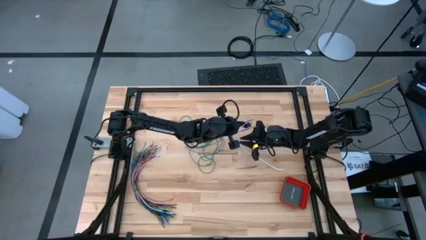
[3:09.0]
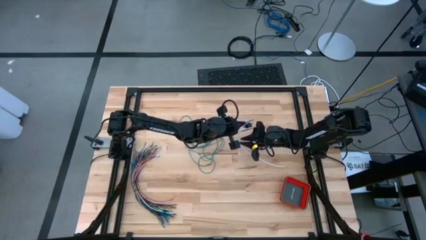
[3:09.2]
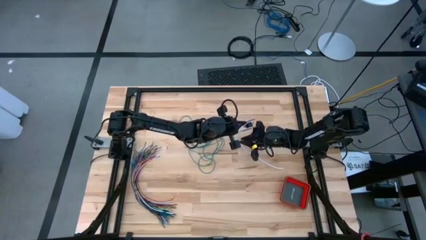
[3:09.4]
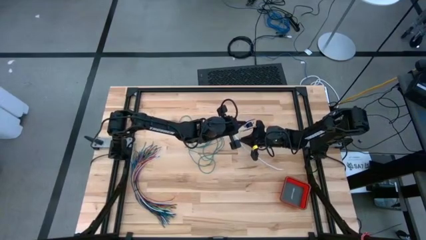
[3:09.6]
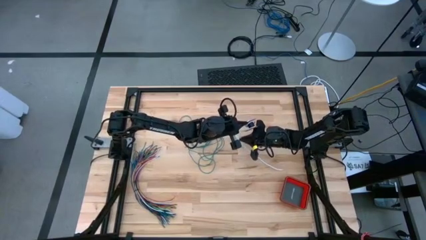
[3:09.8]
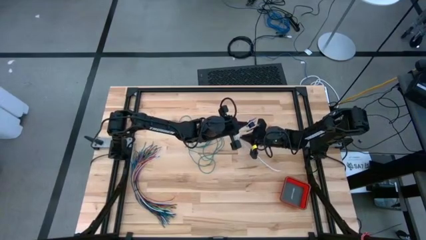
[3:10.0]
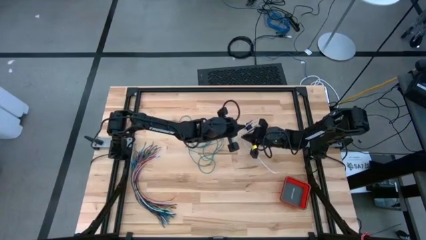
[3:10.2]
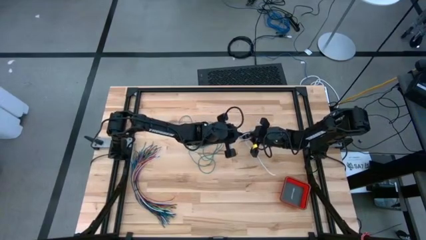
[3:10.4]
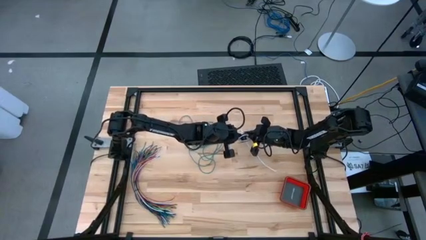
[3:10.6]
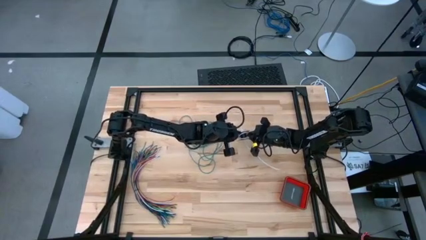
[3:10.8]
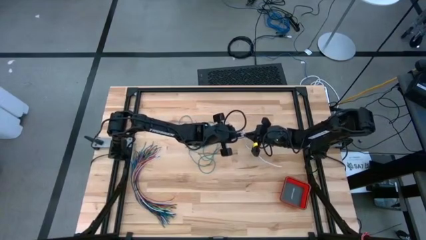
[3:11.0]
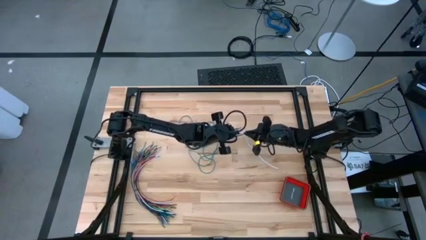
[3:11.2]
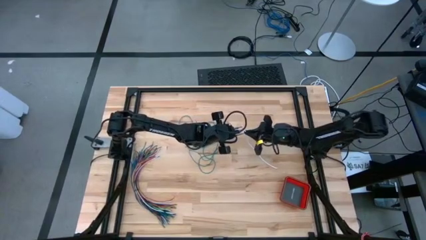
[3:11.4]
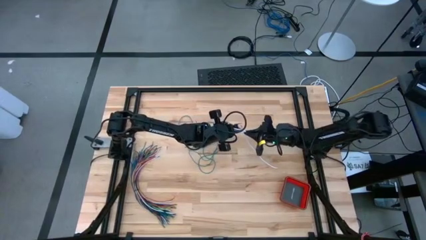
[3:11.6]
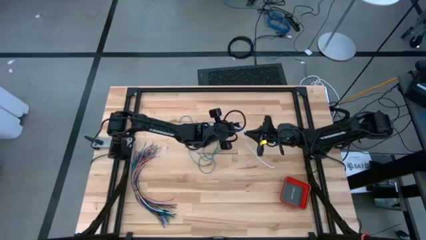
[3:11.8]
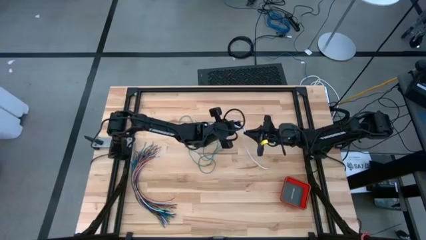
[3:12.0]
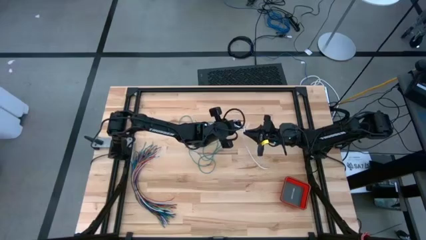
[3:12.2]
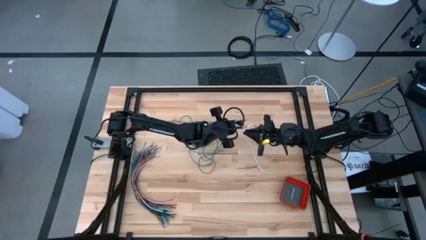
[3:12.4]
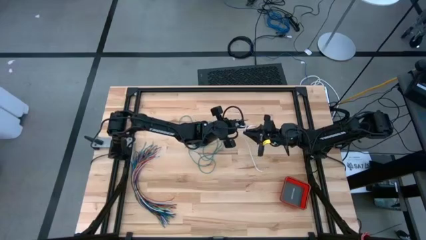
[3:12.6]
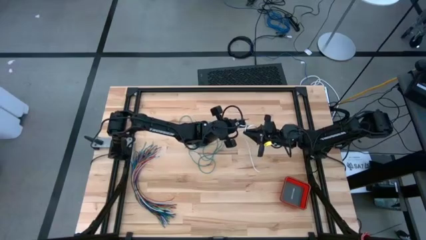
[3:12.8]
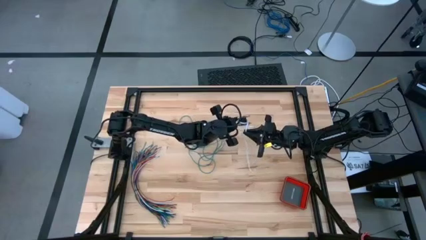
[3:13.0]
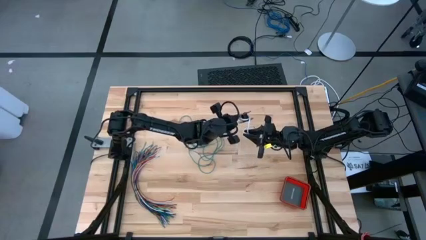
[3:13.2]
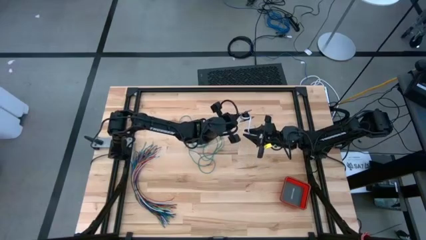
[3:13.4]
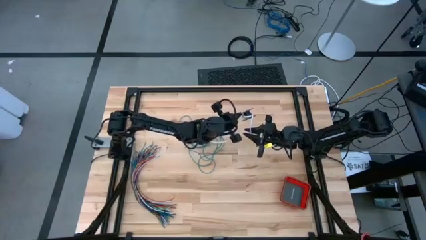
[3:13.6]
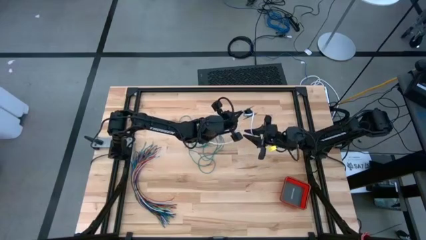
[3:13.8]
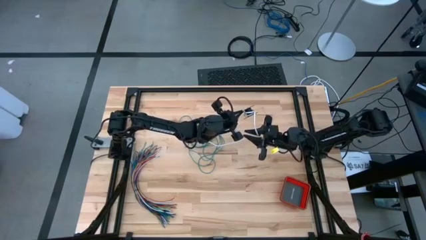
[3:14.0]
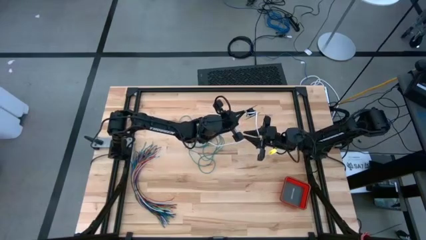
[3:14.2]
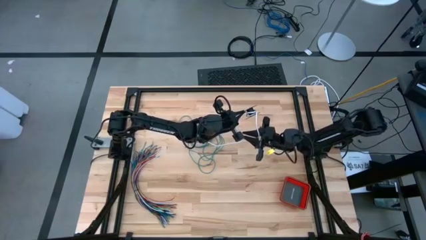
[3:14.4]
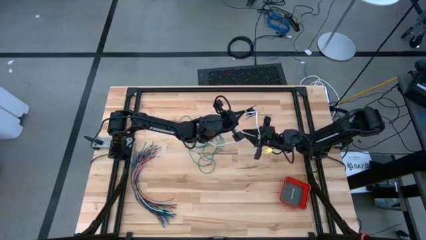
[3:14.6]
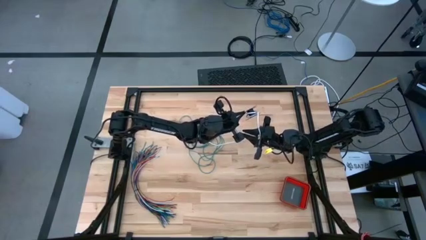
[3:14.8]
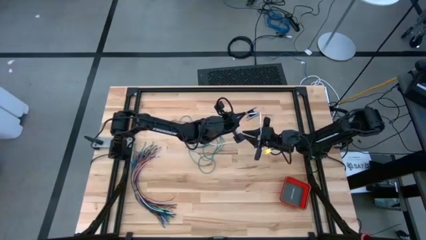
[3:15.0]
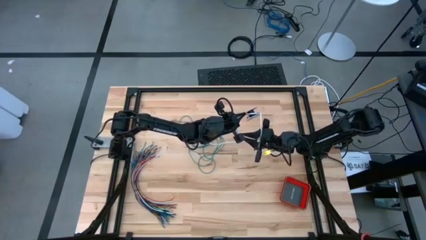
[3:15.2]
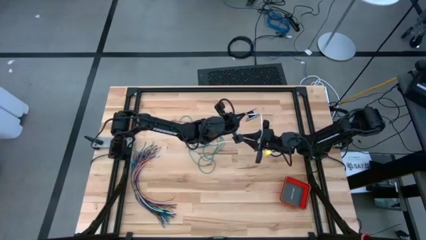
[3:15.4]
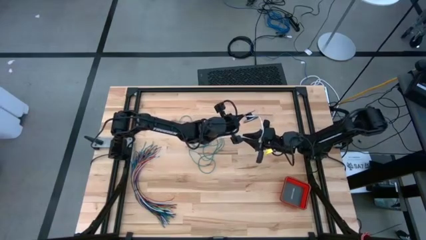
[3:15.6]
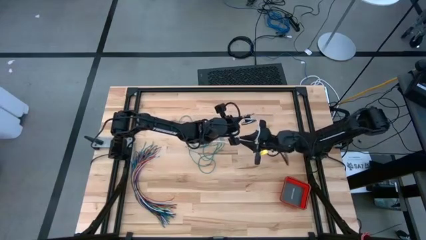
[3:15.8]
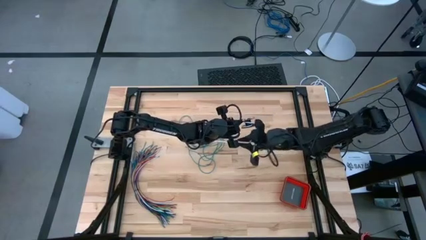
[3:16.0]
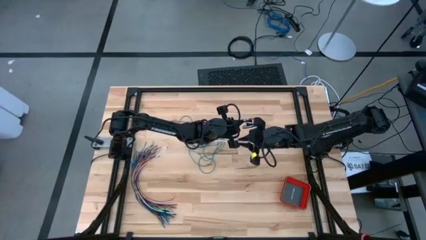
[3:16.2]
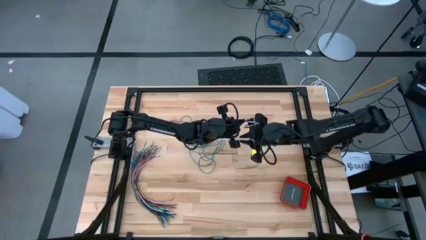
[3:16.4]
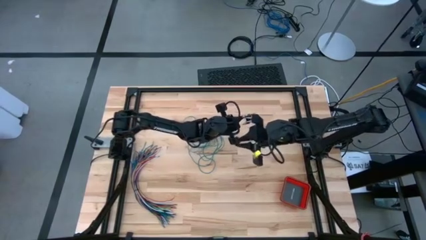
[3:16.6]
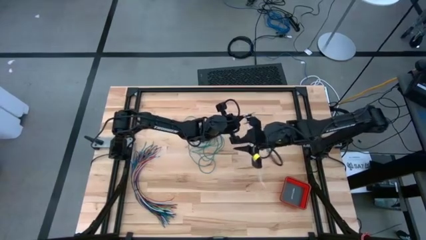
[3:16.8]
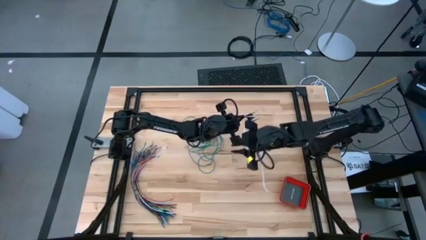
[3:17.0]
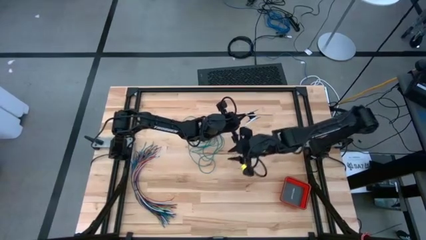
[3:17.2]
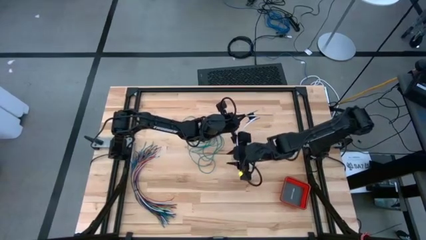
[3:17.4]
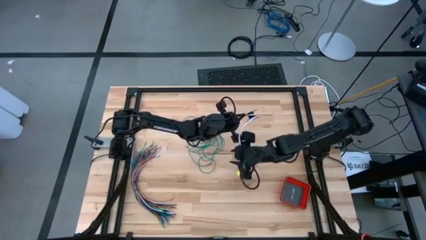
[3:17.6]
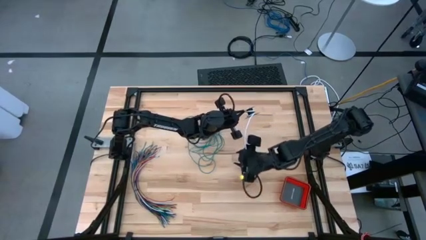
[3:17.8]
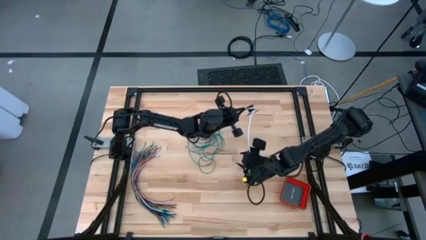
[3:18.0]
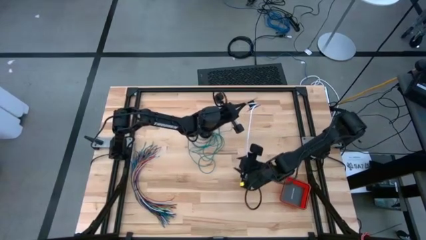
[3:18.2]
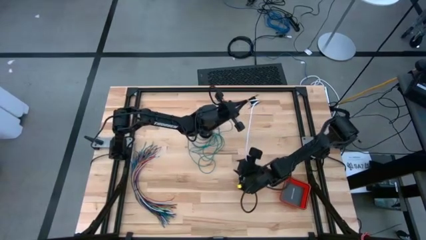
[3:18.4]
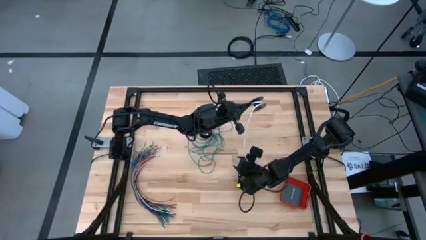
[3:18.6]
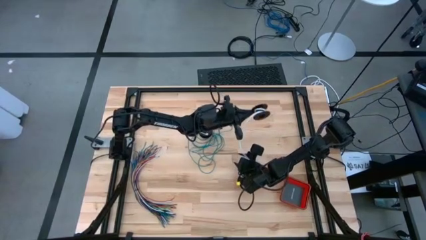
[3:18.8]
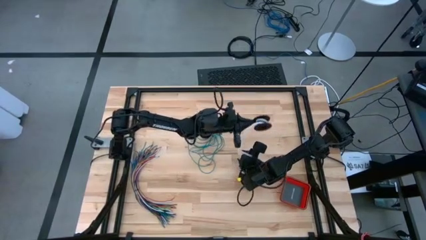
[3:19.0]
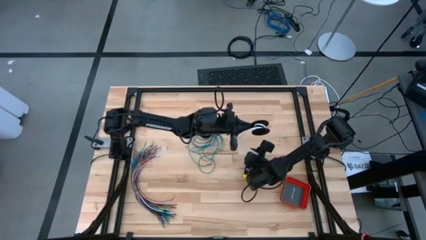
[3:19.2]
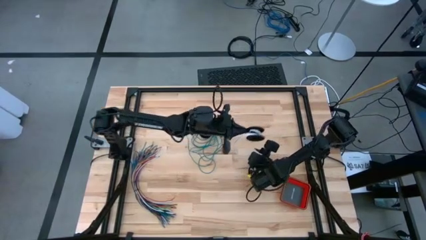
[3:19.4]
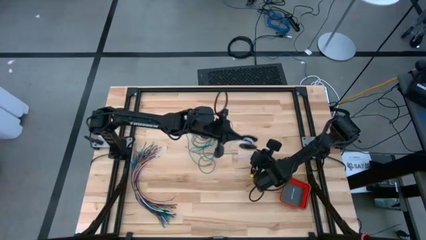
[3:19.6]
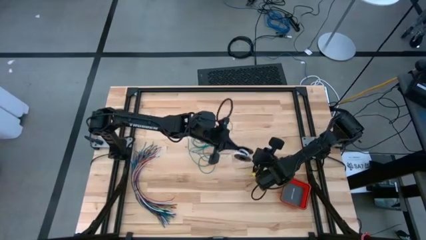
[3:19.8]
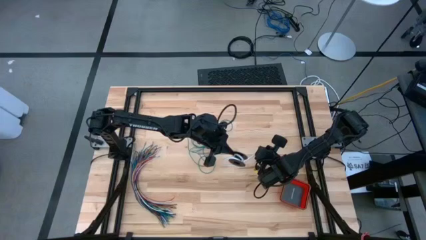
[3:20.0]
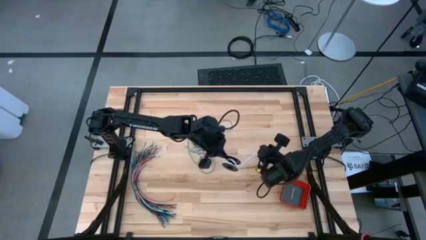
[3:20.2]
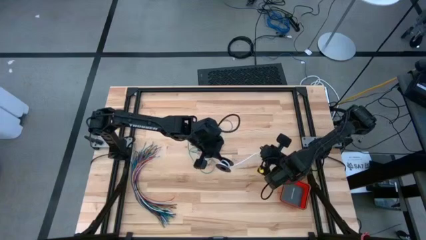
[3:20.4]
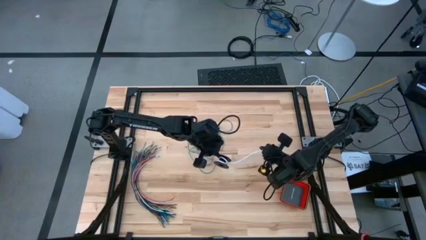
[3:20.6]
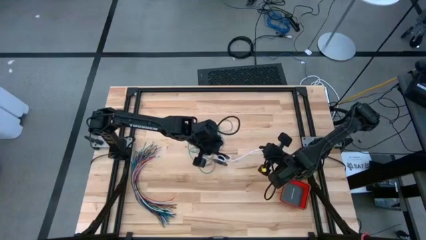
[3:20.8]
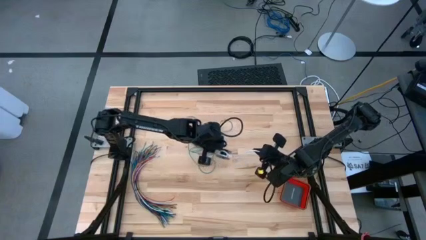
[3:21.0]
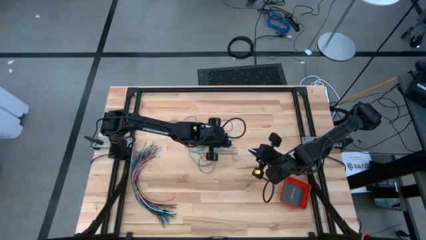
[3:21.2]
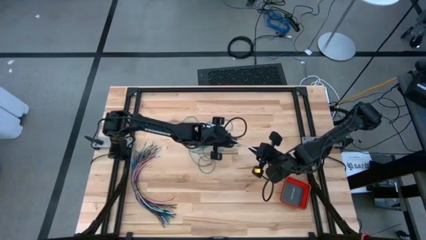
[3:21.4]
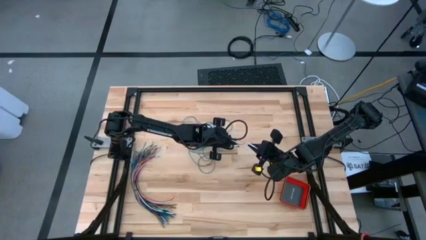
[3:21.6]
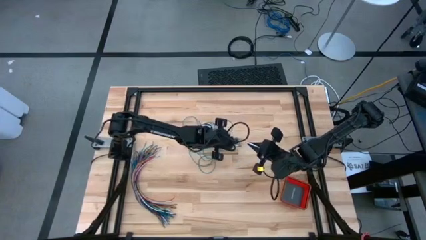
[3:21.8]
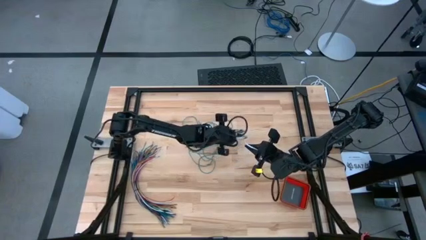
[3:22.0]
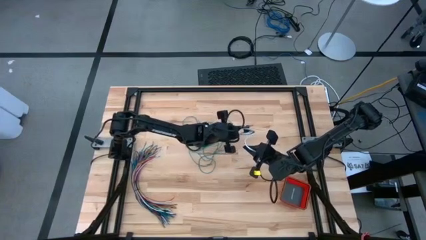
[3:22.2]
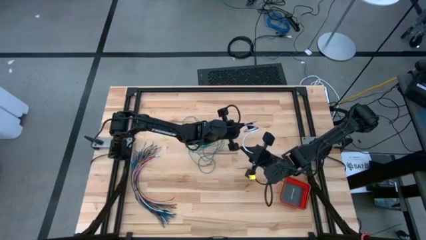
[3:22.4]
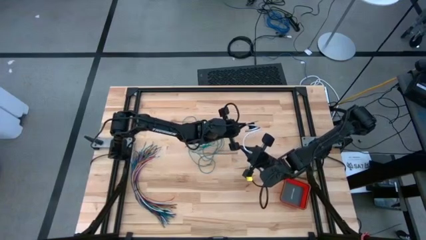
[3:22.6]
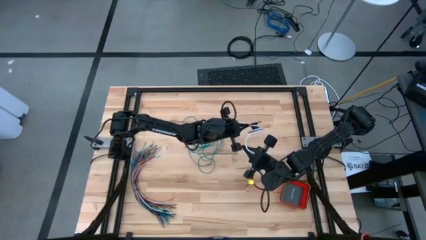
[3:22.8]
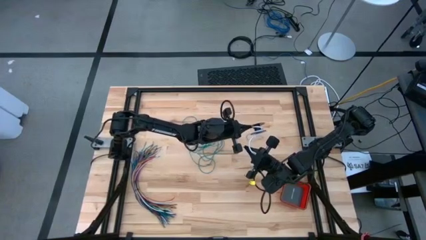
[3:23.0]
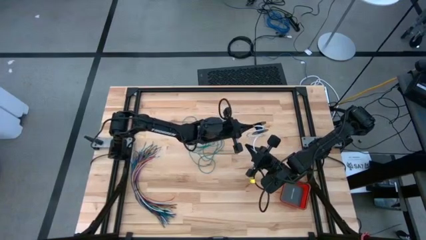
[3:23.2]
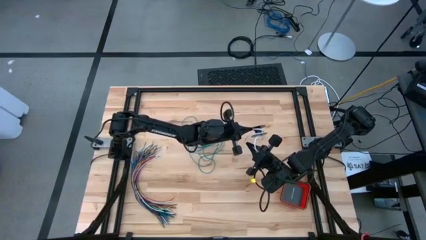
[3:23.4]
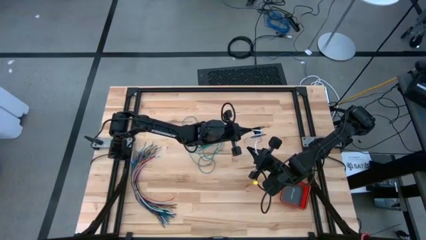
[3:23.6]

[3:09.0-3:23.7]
Task: Coil cords
Coil the white wire onto the spool
